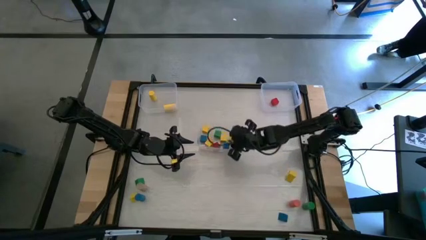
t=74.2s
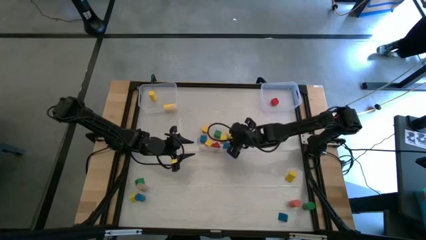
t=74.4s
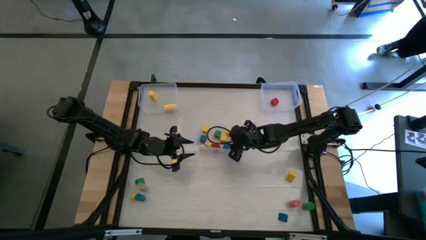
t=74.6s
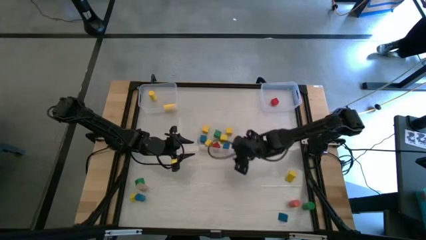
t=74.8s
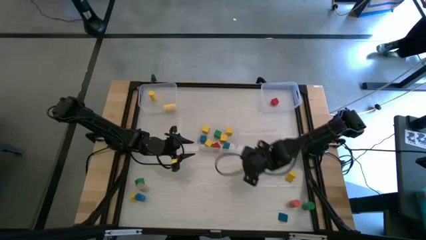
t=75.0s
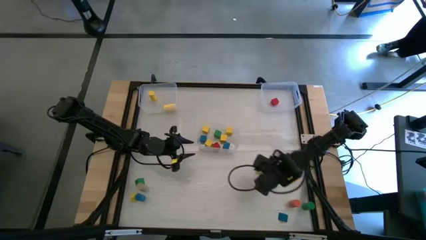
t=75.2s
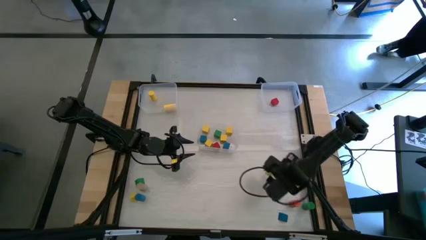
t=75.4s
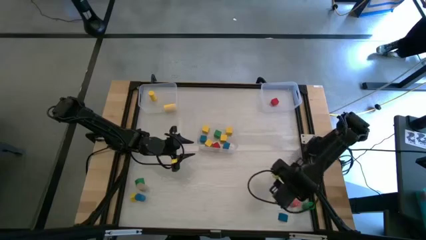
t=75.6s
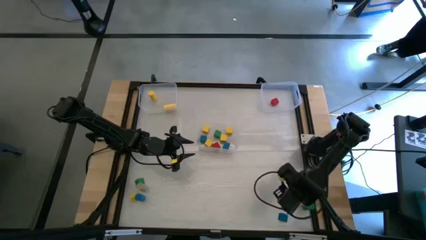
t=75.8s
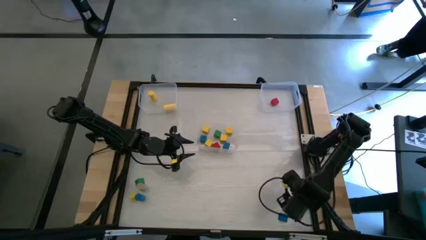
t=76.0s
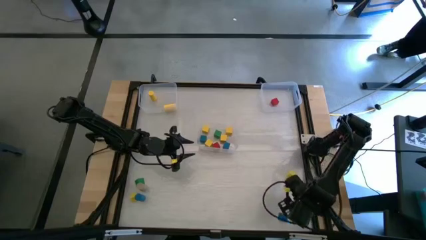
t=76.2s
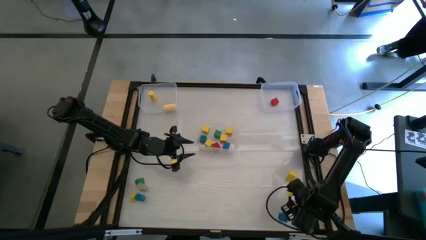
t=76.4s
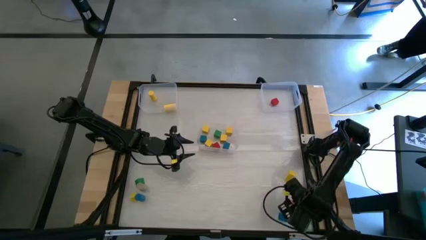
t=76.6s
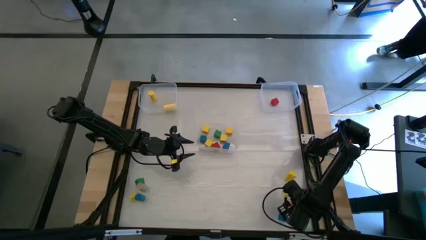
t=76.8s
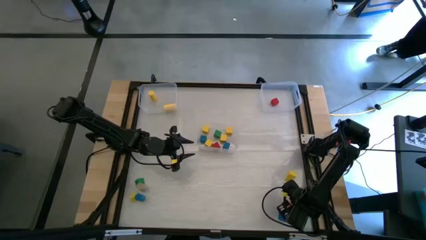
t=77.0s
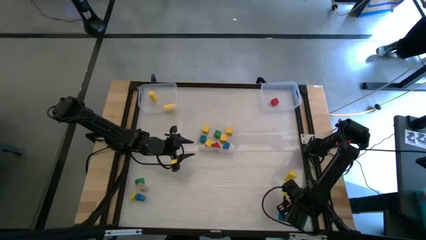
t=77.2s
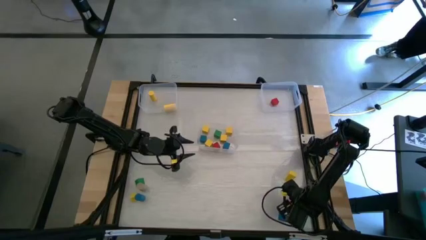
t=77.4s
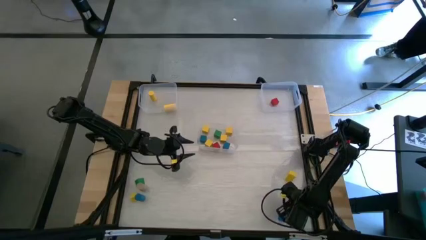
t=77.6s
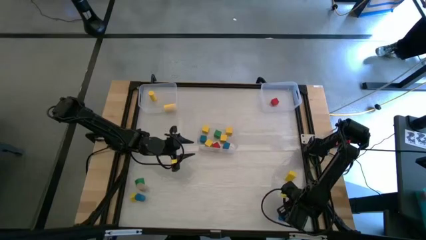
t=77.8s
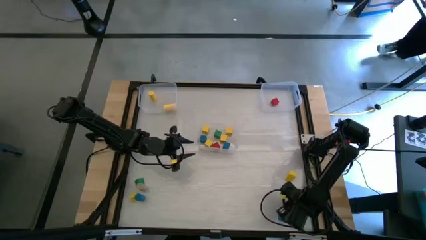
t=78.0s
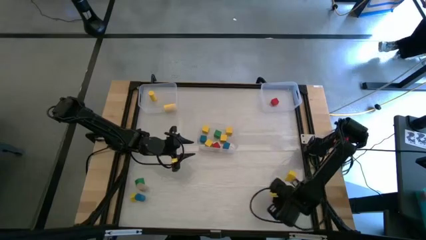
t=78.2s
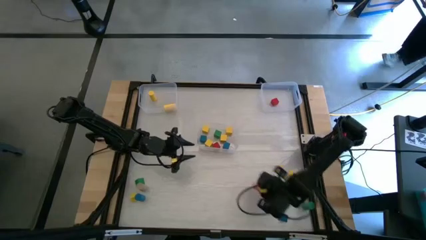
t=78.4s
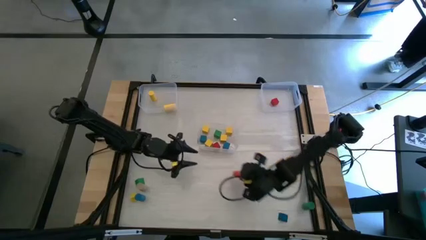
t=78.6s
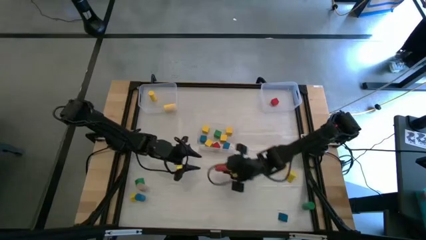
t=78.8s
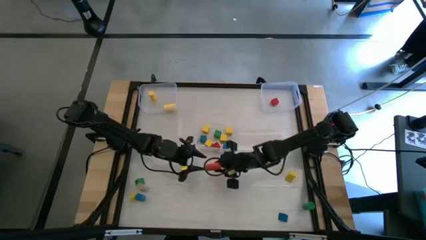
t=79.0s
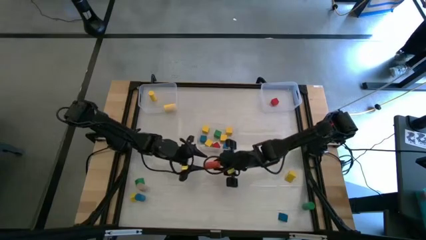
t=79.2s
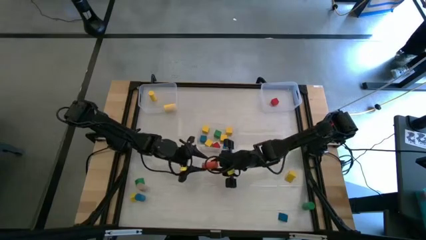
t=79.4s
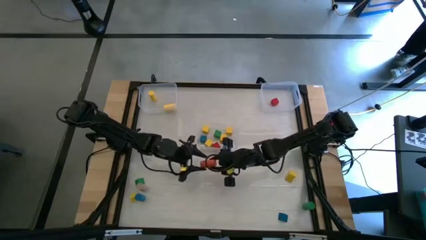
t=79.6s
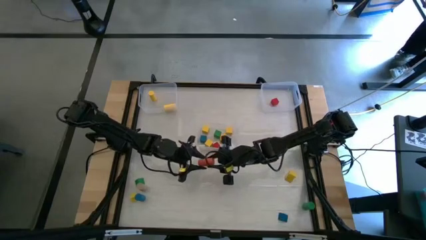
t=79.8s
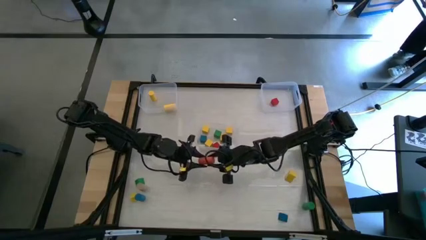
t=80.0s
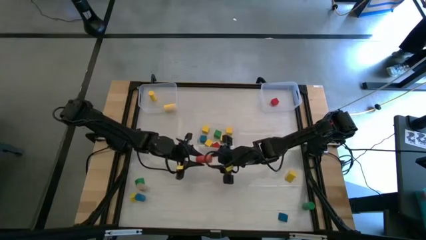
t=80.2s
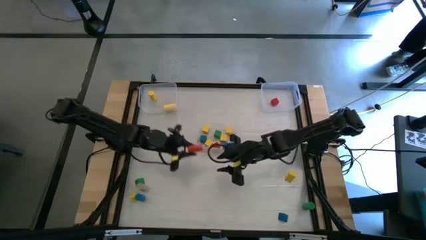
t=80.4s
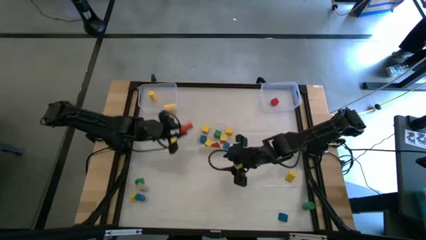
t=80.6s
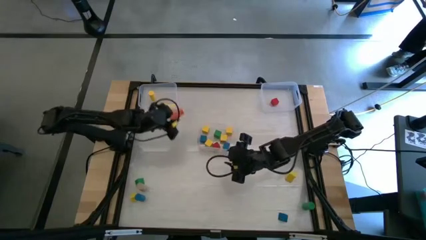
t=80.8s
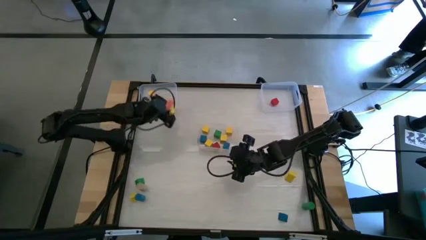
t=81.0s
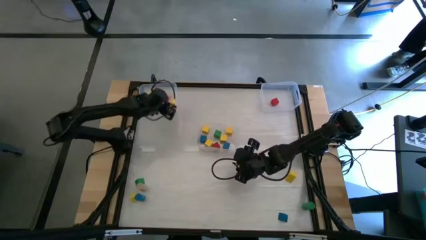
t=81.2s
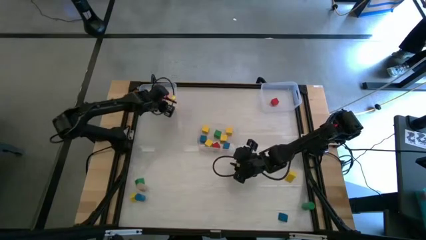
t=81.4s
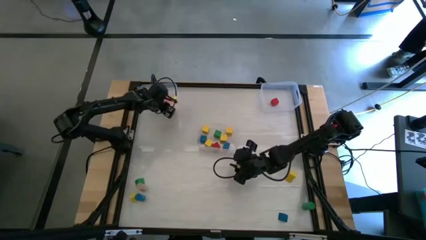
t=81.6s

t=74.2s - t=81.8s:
Task: Sort blocks by size
Put the orange cylindrical block into the top left transparent bin

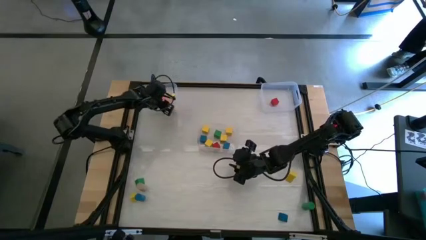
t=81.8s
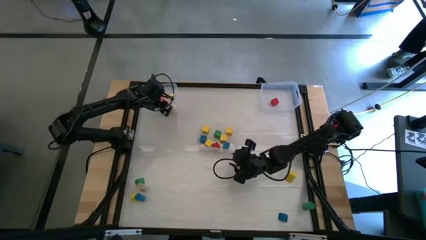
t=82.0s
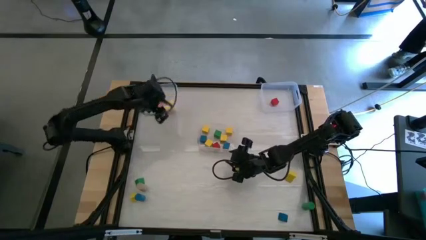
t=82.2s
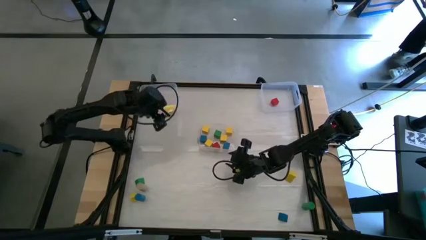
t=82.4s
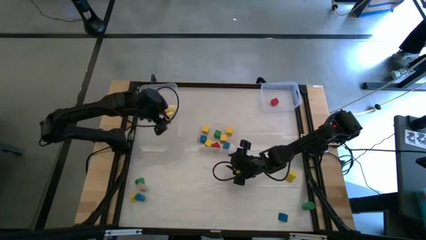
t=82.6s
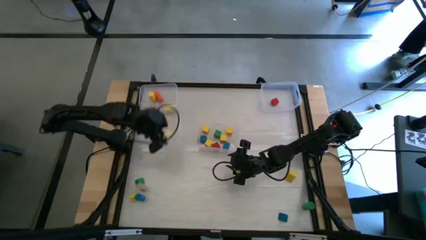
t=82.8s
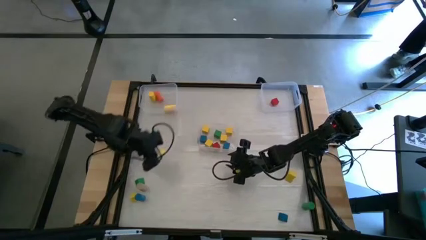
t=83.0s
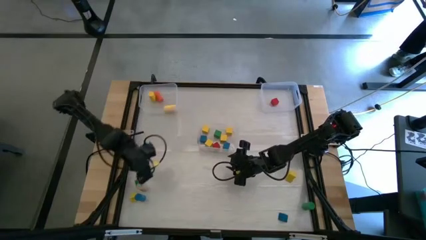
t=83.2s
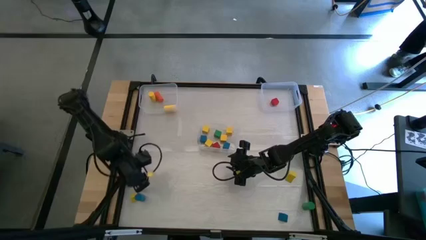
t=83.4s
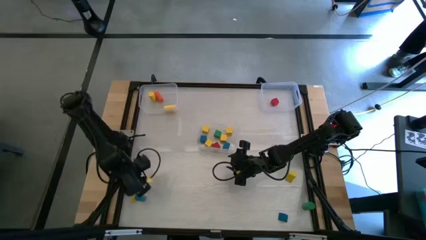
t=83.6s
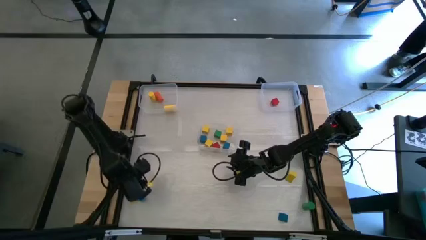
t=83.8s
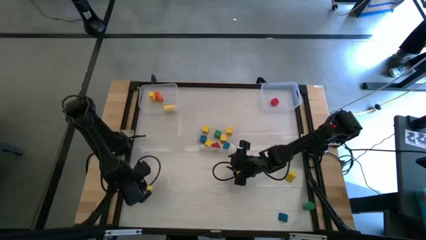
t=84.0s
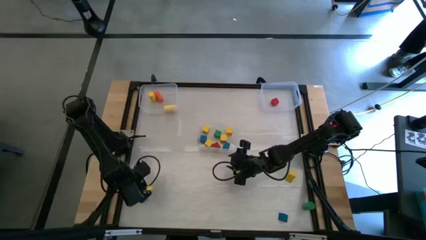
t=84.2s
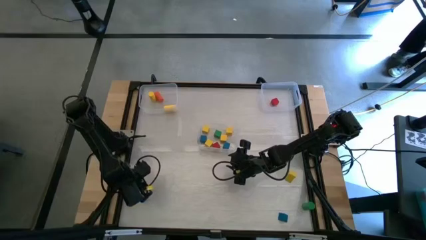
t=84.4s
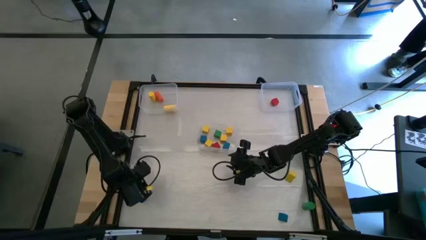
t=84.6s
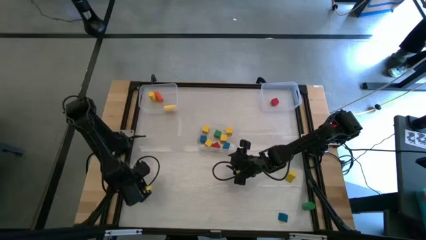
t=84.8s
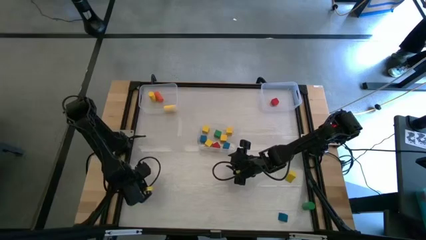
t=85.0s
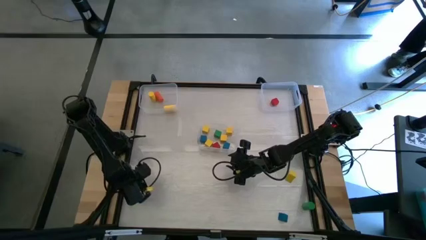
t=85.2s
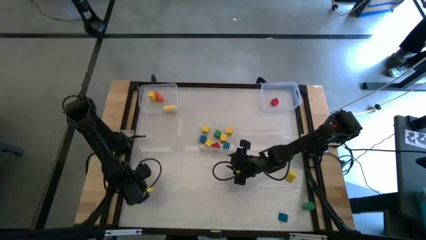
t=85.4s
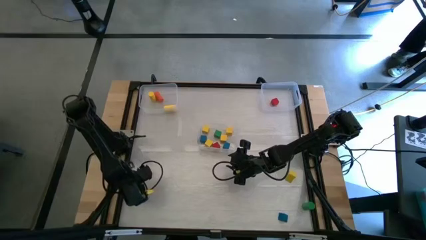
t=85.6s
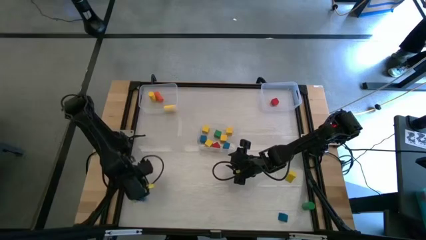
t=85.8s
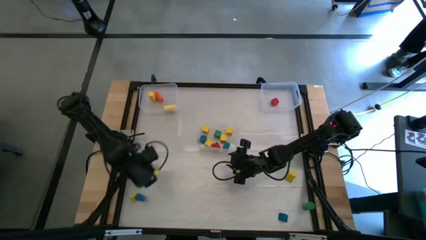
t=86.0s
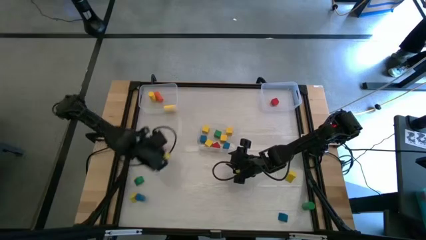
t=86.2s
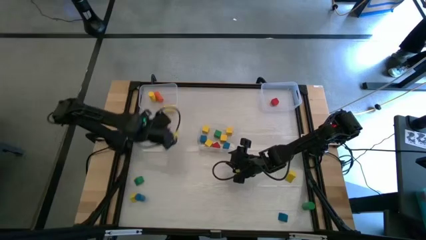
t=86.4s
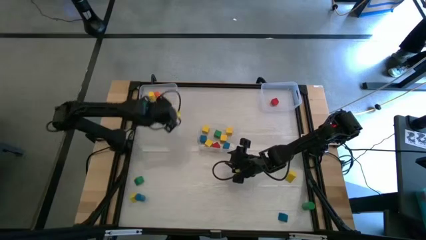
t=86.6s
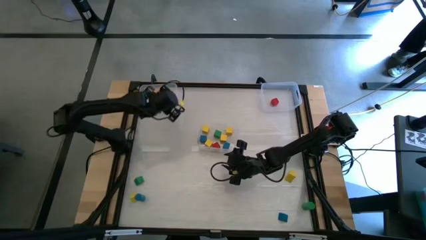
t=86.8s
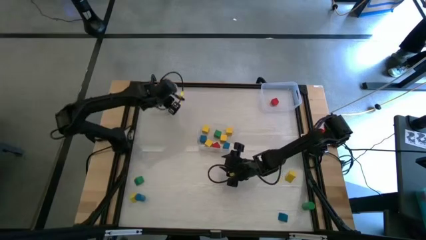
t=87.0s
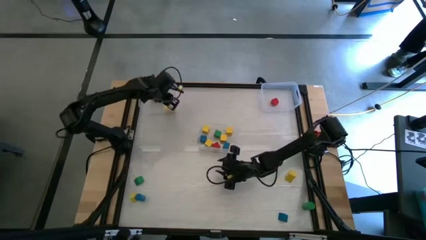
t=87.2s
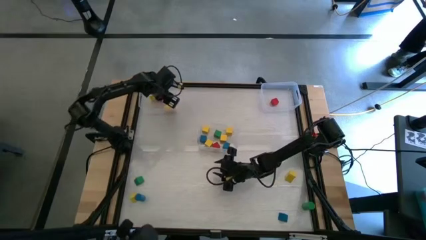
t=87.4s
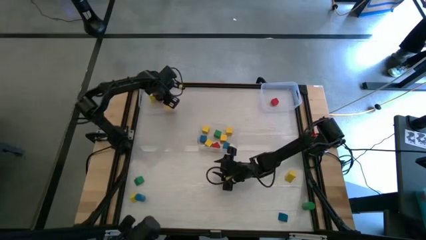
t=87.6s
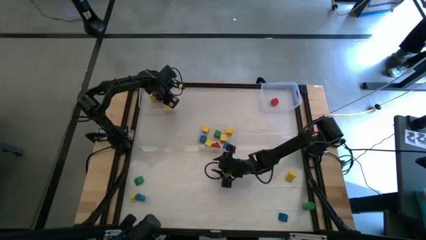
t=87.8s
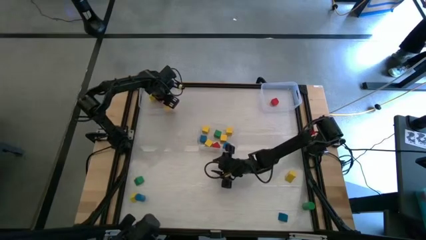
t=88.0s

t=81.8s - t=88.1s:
Put the brown cylindrical block into the top left transparent bin

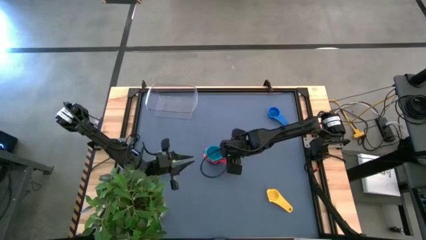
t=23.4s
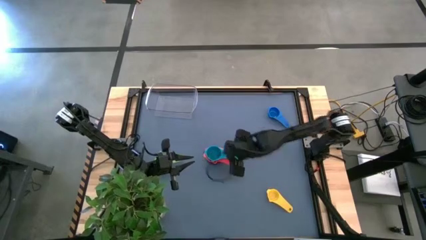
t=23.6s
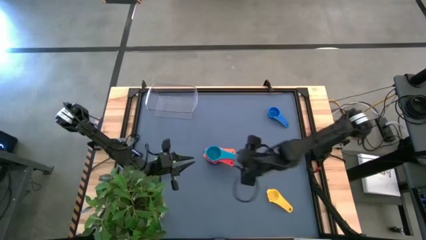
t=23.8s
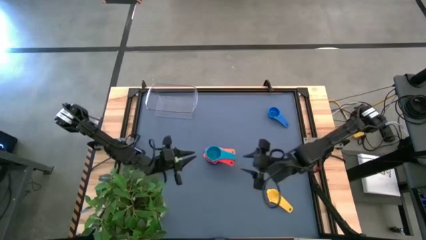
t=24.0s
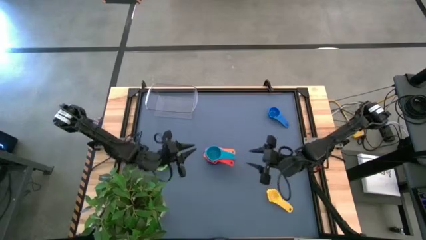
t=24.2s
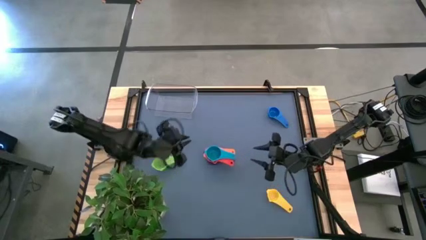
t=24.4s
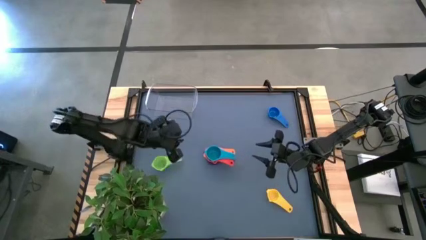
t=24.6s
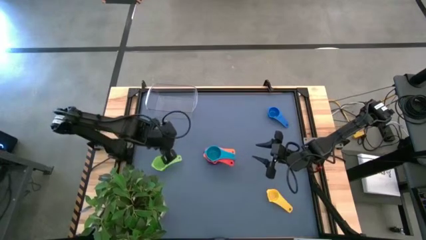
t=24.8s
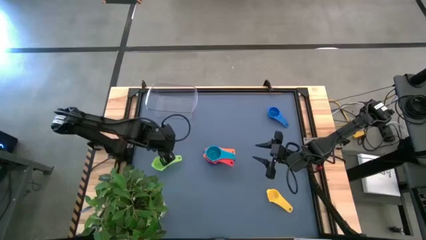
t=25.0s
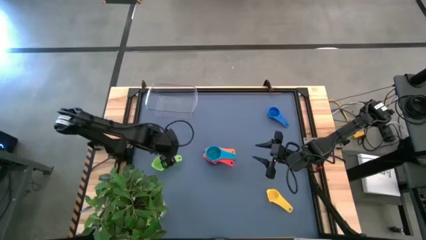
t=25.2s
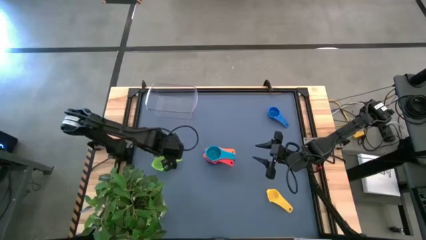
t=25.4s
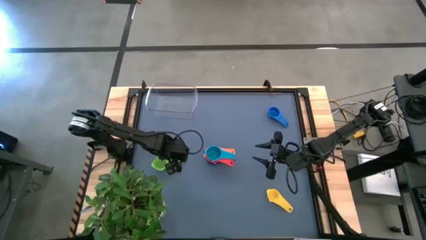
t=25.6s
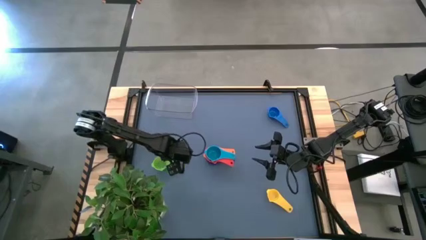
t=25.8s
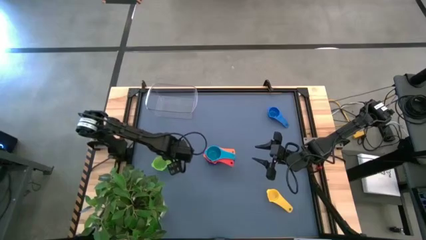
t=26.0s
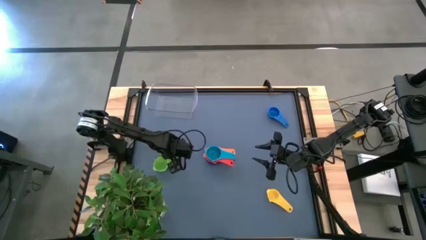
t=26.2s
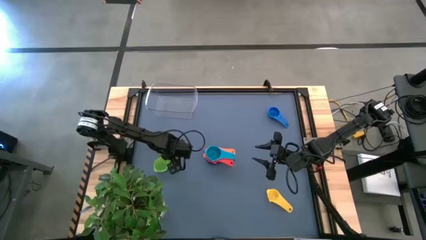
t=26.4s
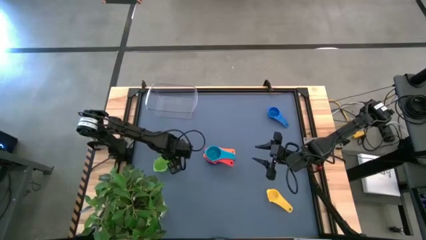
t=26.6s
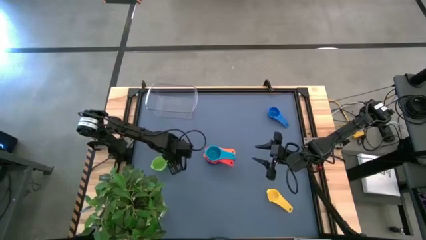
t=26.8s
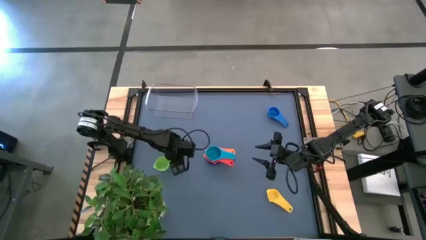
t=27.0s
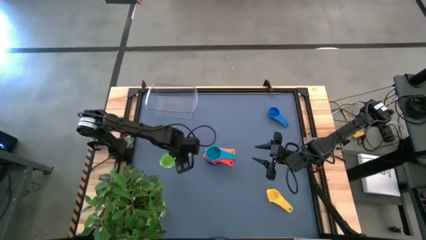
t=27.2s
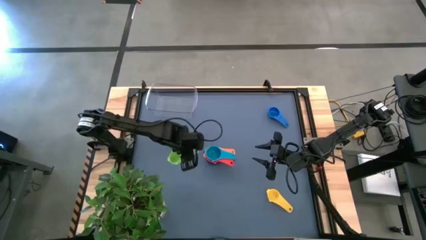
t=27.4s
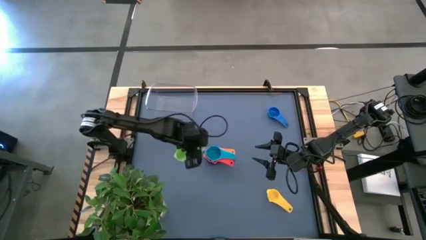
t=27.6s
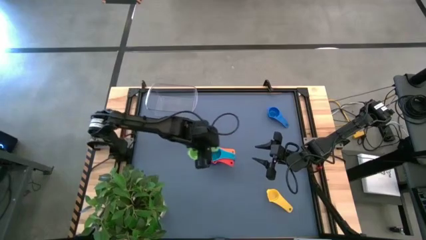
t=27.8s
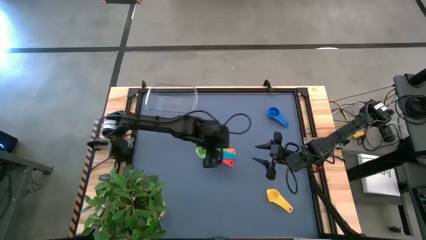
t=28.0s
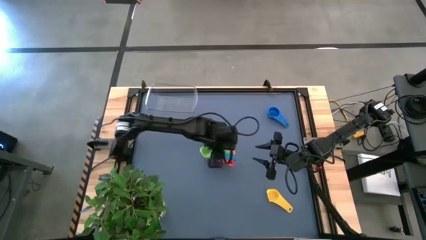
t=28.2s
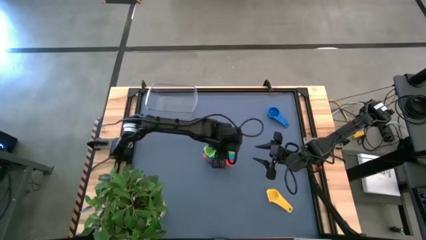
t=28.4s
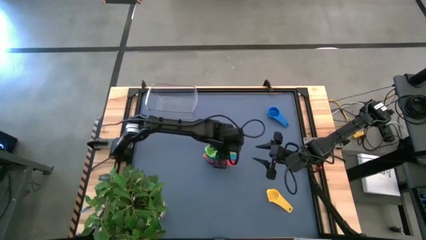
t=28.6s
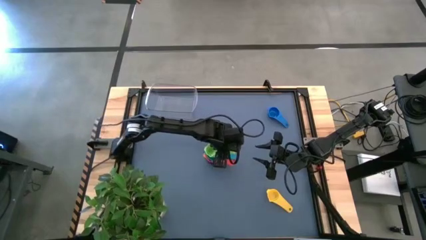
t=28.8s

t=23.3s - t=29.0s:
Task: Nest measuring cups in basket
Stack the green measuring cup on top of the light blue measuring cup
